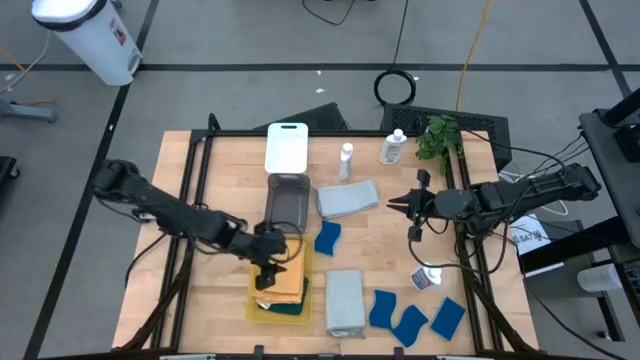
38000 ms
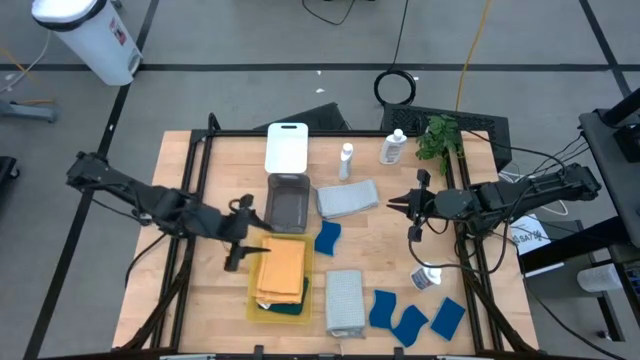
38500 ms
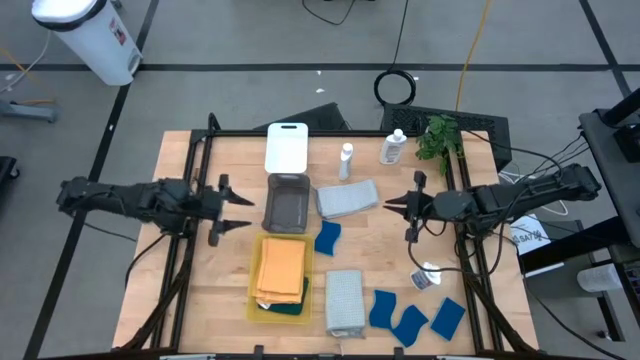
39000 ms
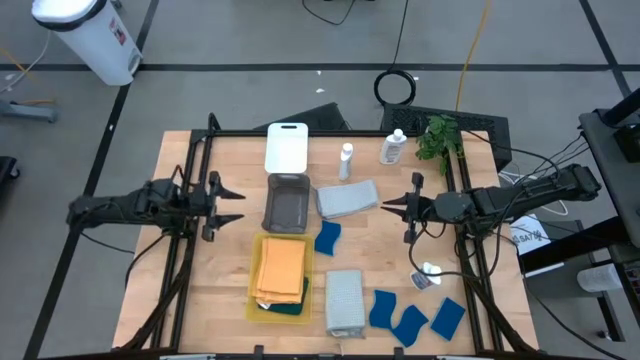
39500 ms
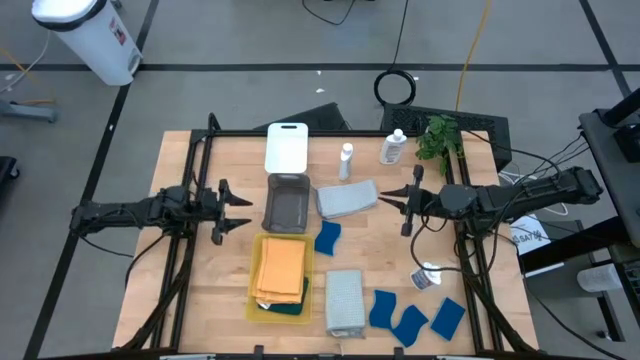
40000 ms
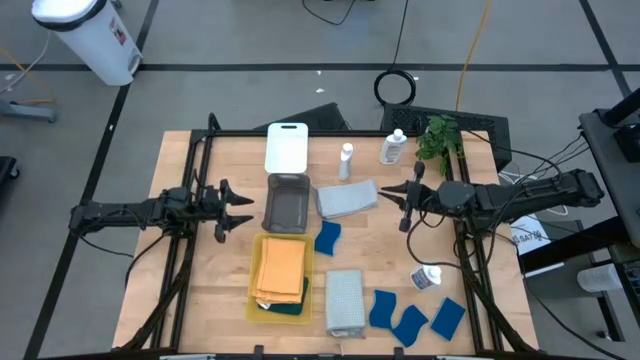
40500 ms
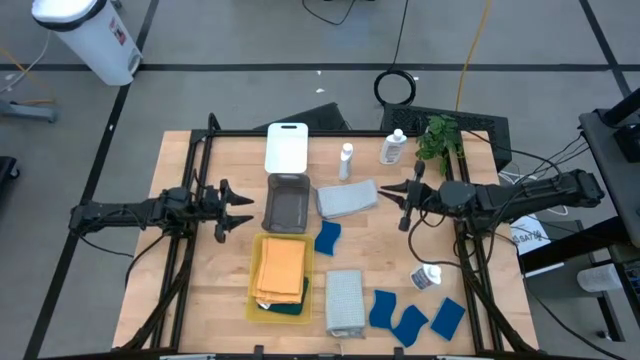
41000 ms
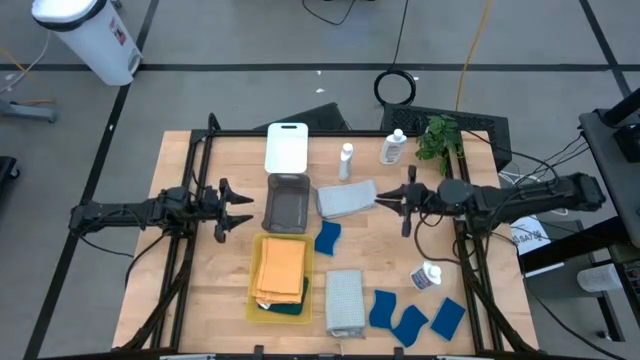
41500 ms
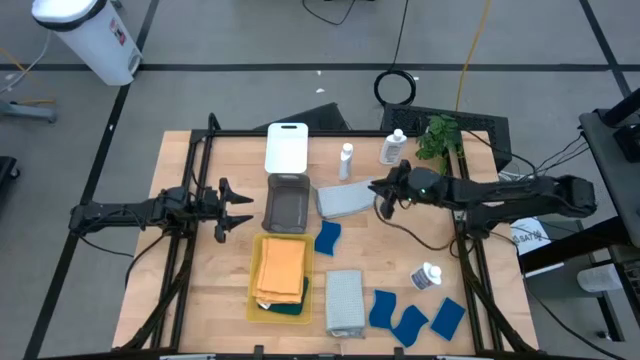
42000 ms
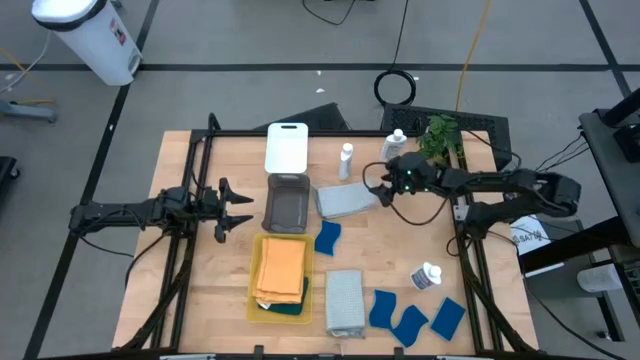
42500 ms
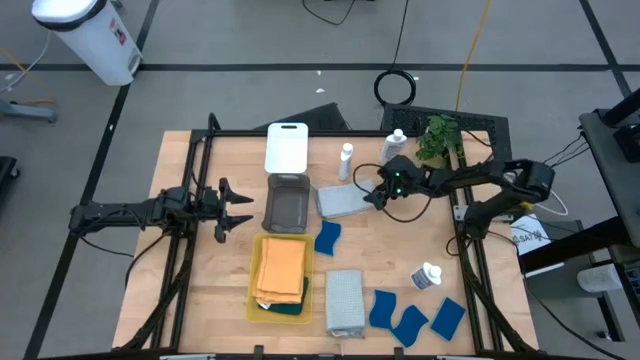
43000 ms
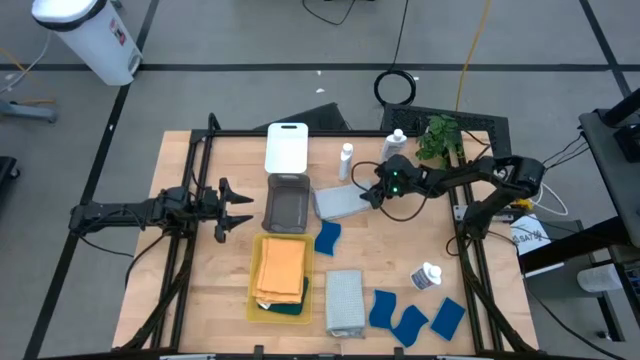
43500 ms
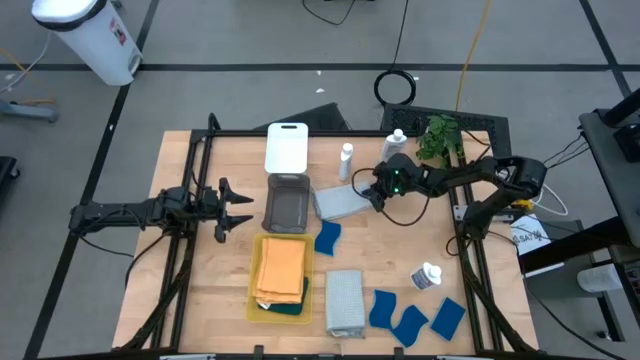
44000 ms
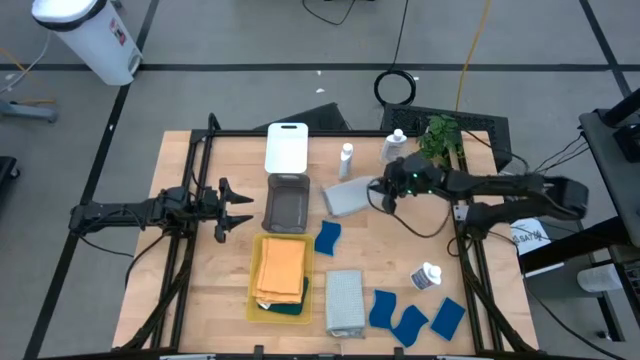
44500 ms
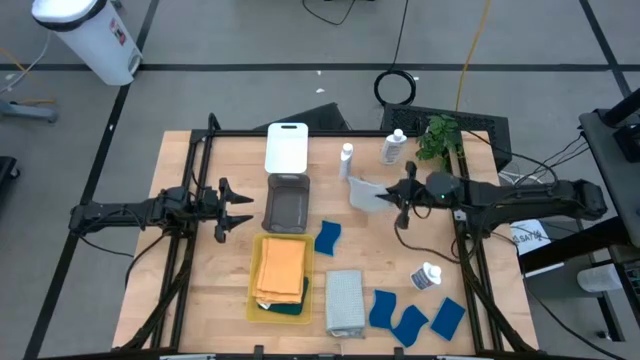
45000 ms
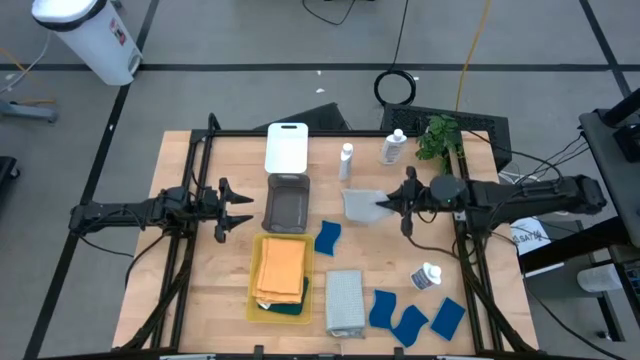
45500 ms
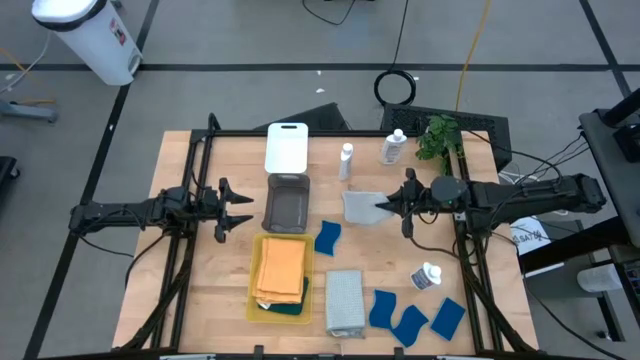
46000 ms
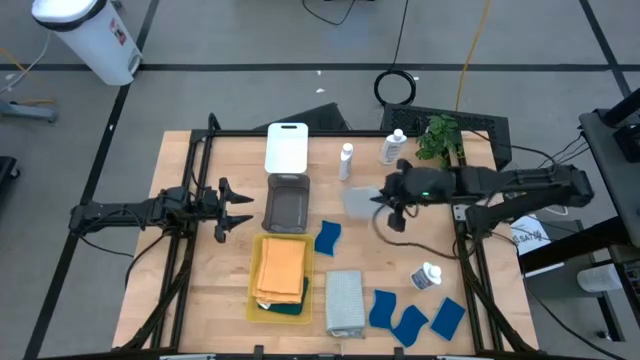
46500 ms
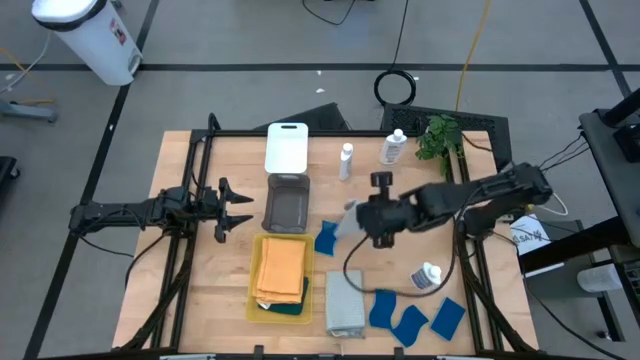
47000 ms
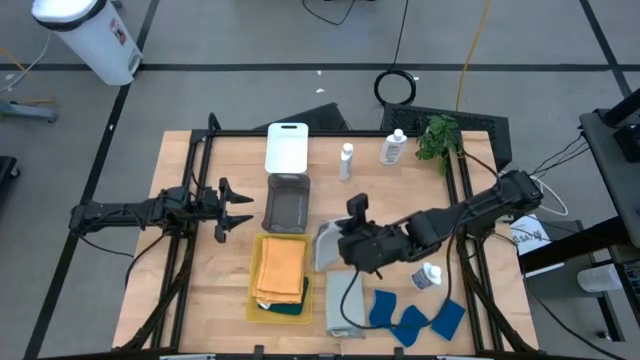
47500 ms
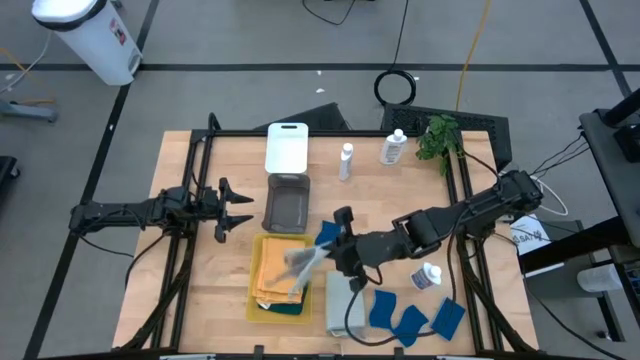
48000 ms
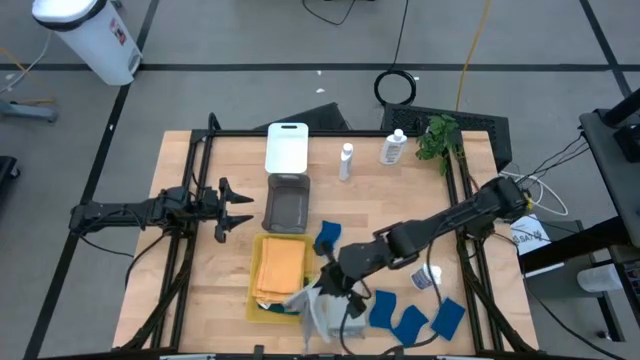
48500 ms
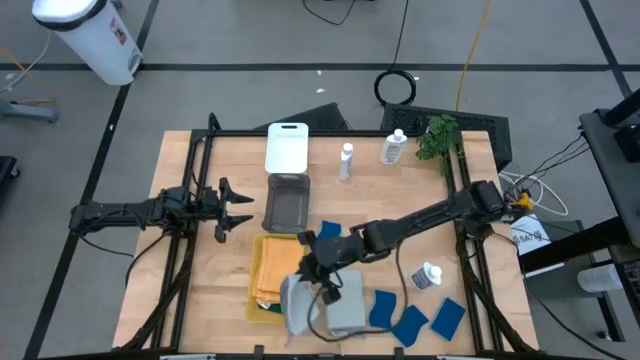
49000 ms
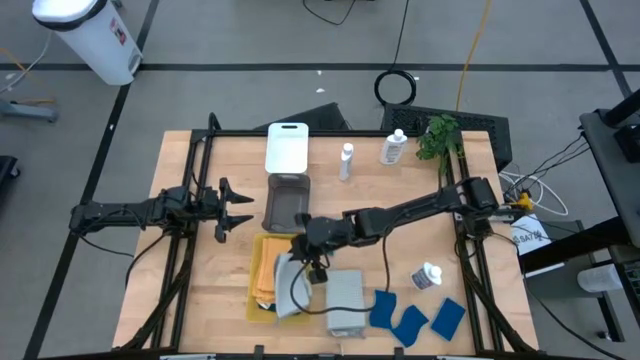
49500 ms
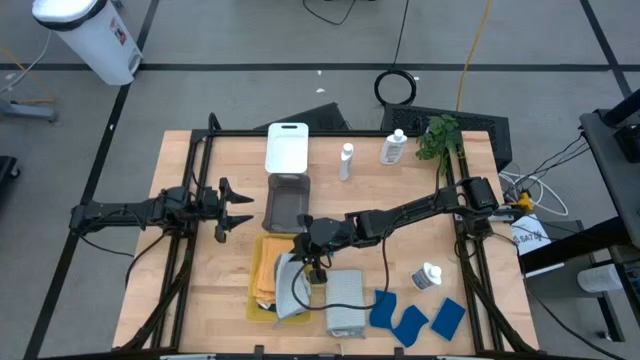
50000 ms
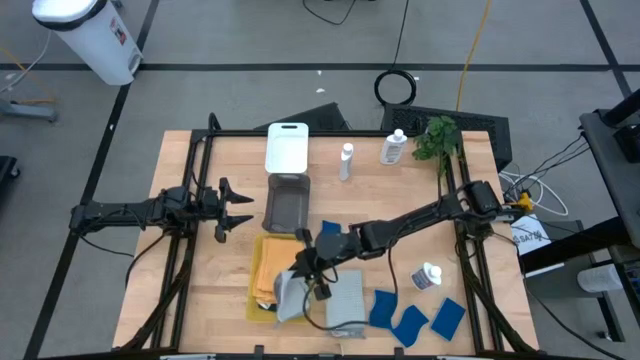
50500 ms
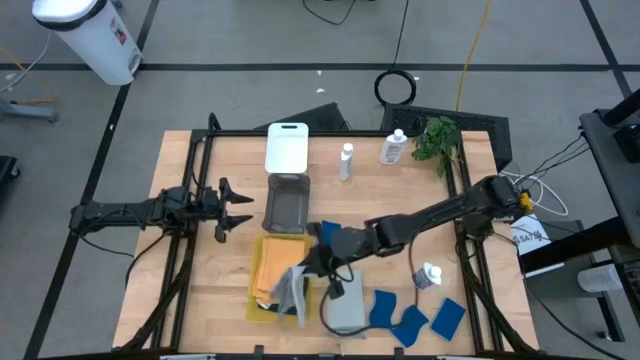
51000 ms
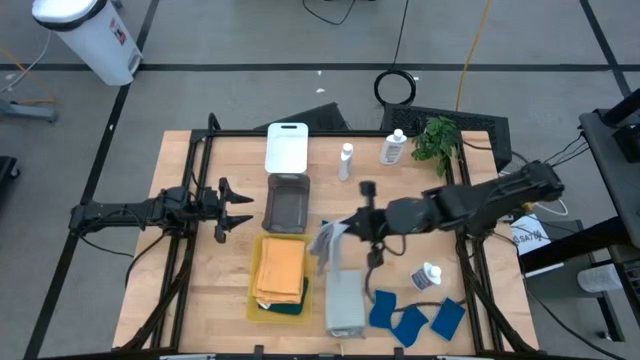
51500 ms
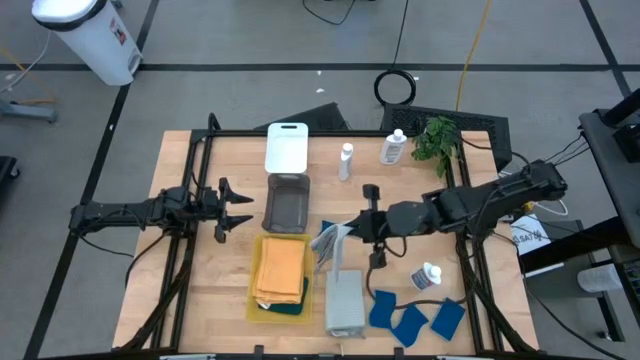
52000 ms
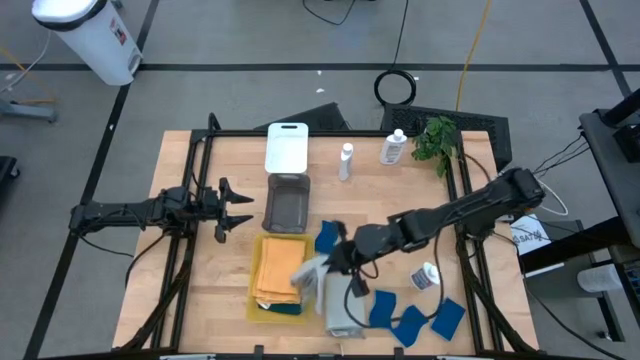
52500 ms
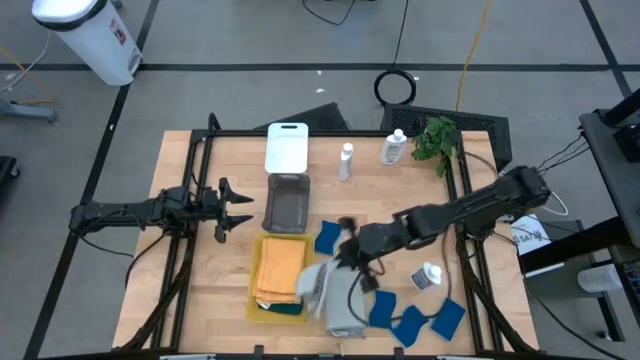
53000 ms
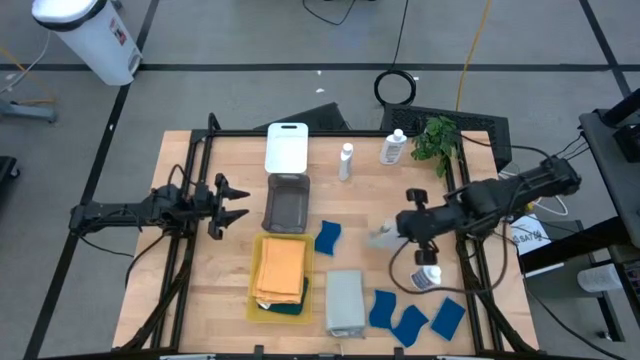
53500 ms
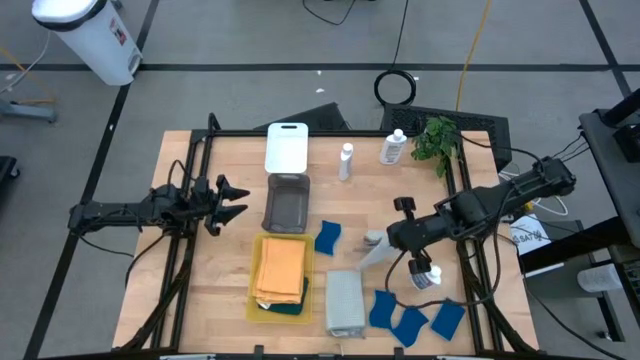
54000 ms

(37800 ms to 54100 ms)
Task: Pick & Place Kitchen Items
Put the gray towel into the yellow bin

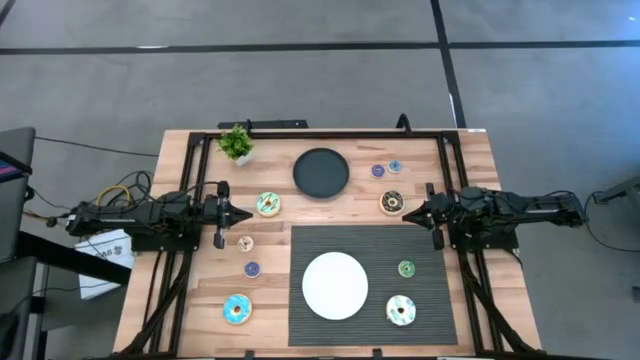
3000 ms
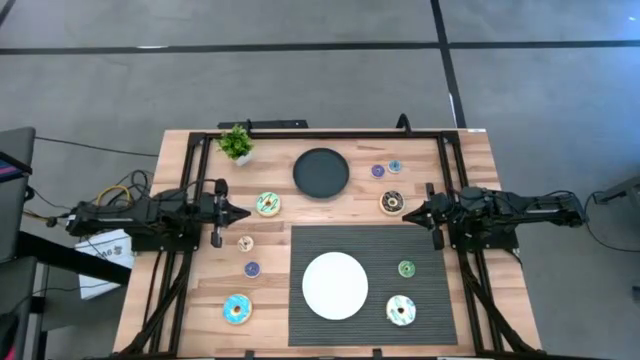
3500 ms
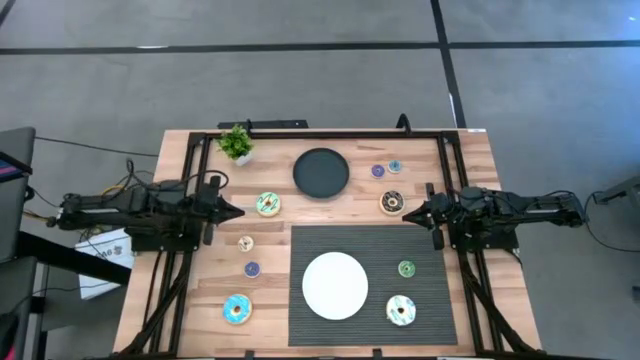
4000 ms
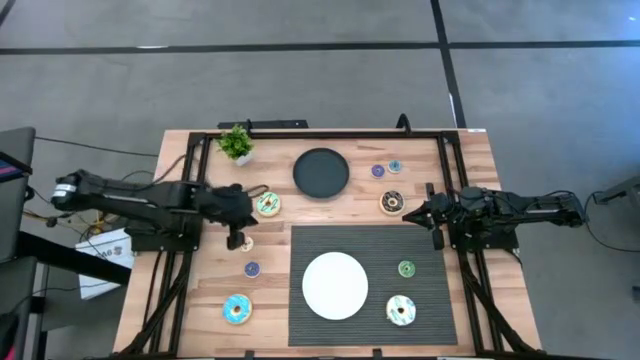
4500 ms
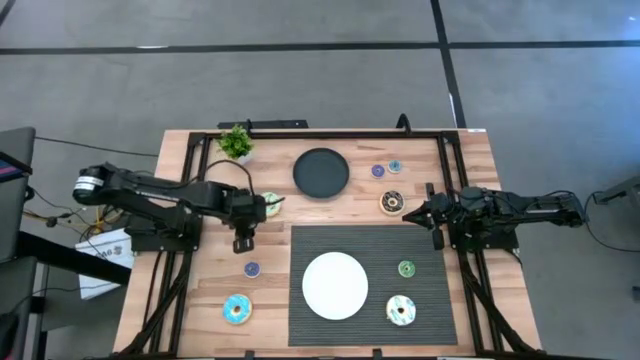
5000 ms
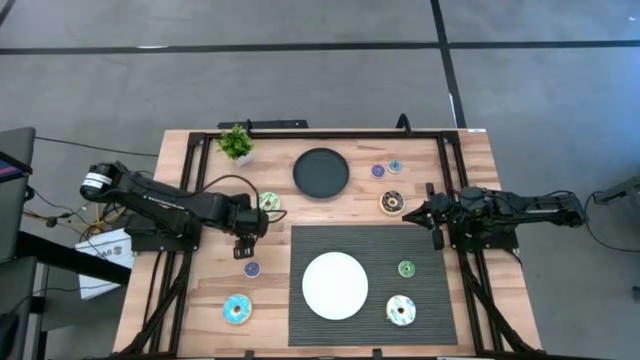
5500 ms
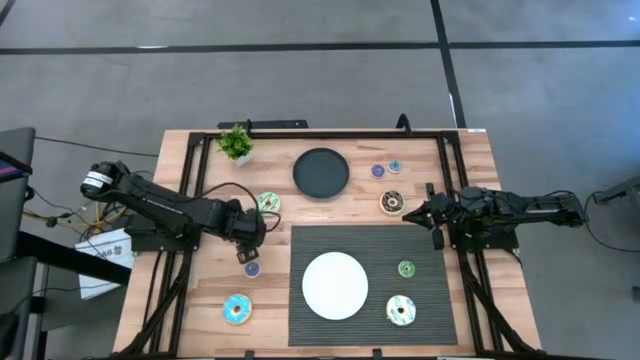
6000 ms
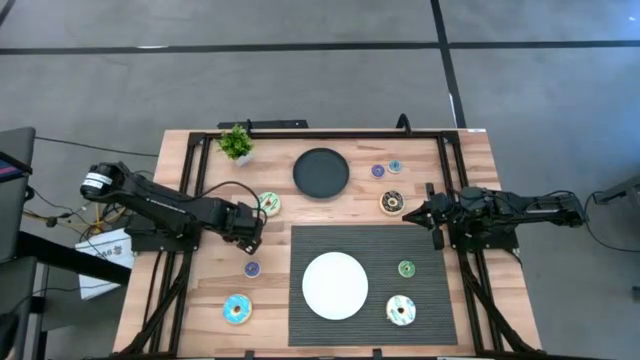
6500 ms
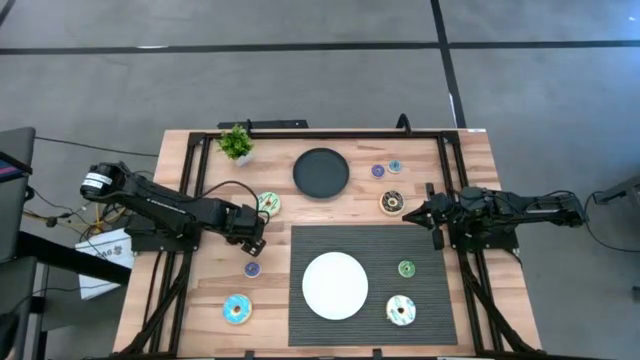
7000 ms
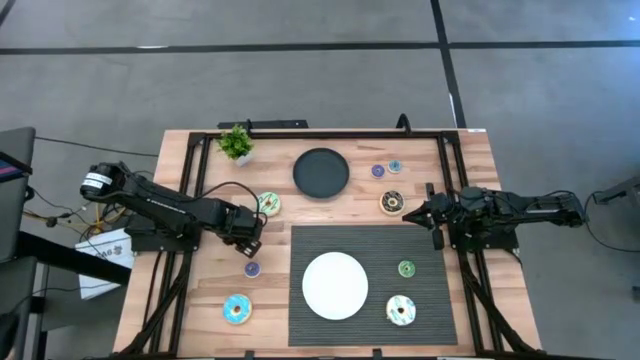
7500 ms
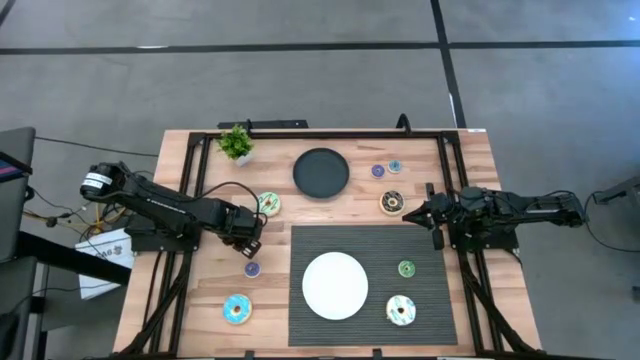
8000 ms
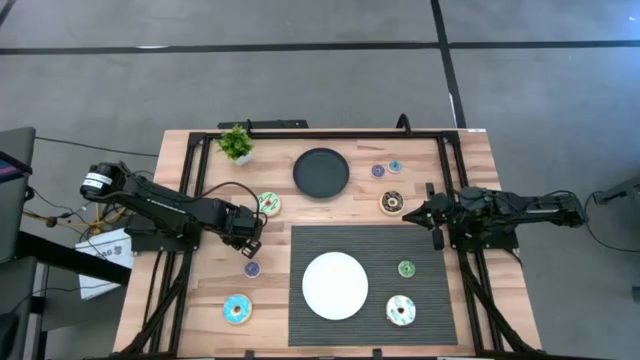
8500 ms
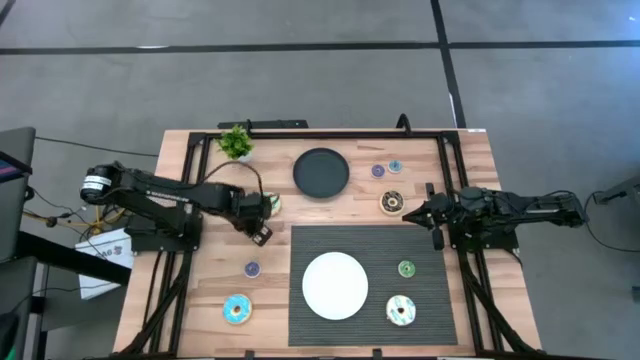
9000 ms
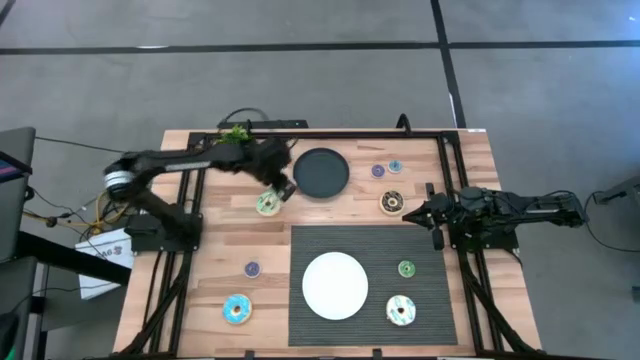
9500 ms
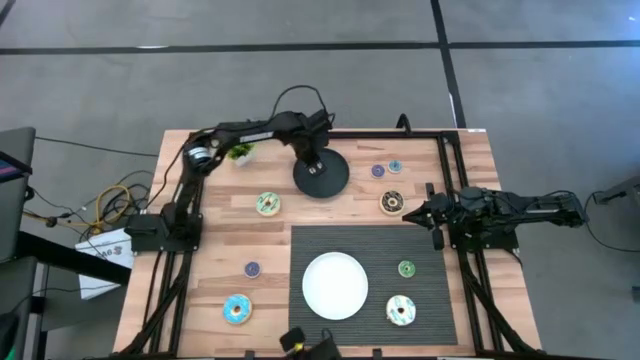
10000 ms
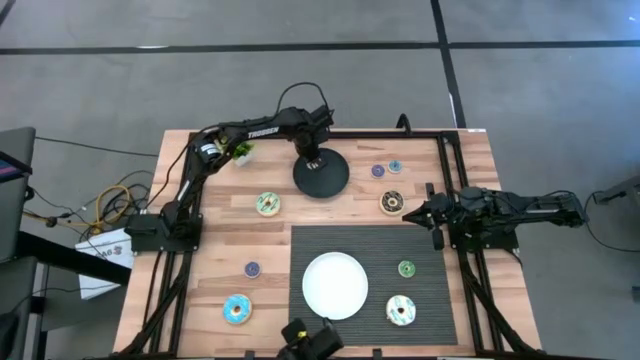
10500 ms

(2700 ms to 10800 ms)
Task: Pick & Place donuts
Put the small white donut on the black plate
